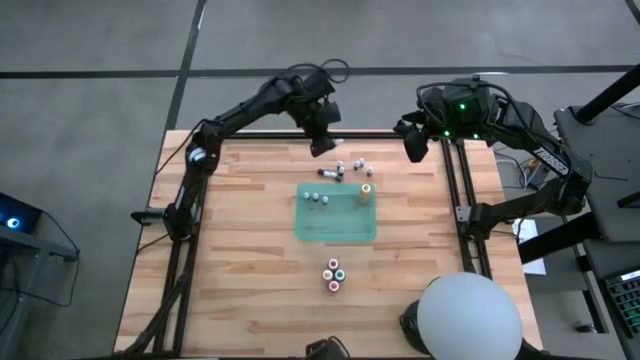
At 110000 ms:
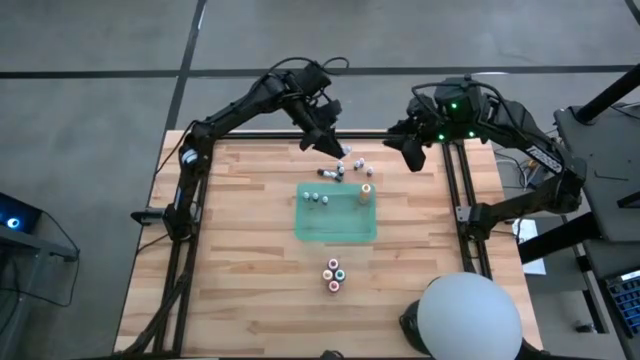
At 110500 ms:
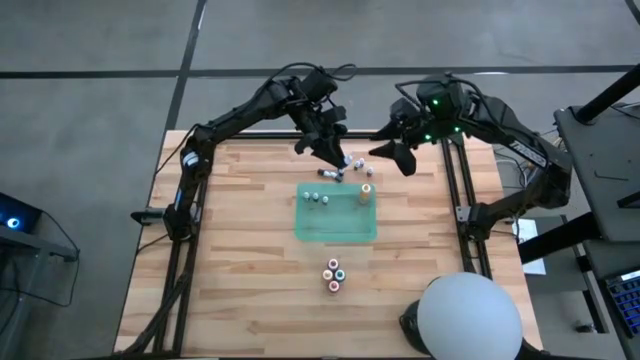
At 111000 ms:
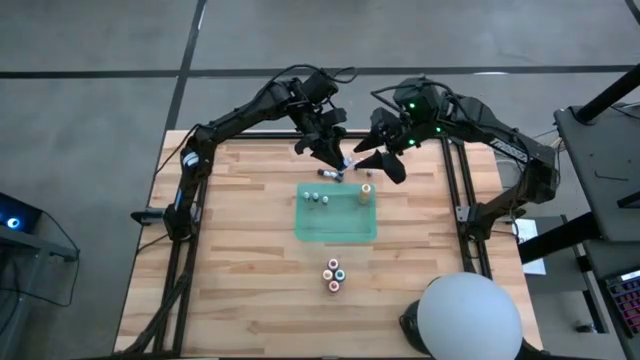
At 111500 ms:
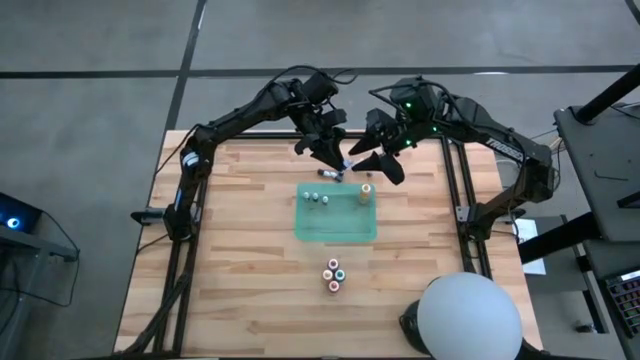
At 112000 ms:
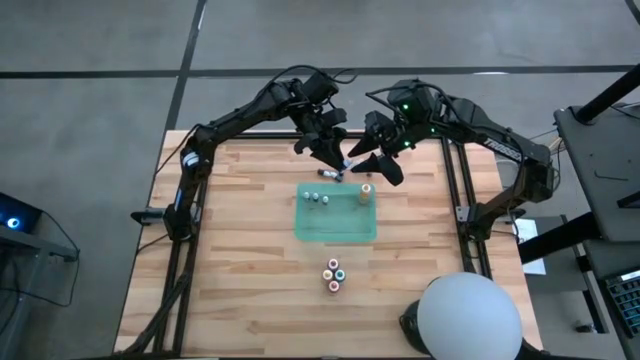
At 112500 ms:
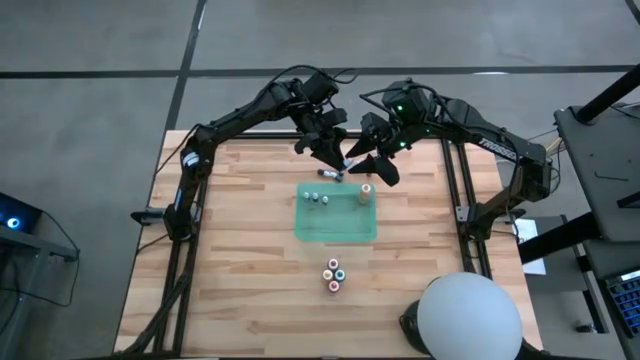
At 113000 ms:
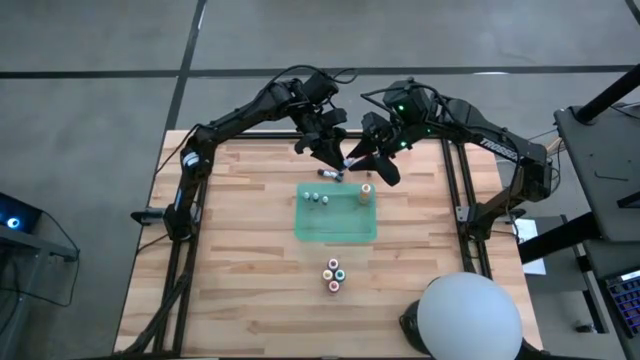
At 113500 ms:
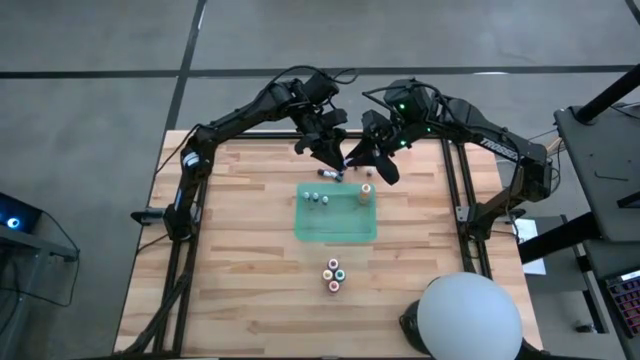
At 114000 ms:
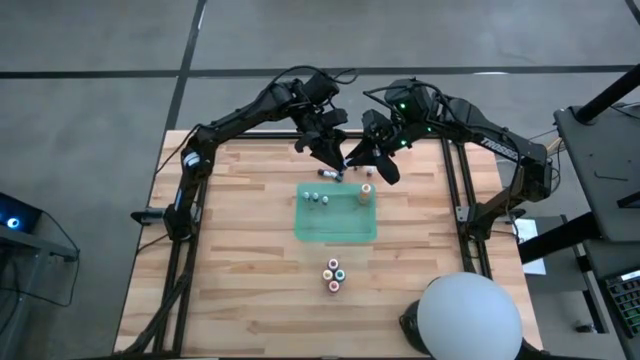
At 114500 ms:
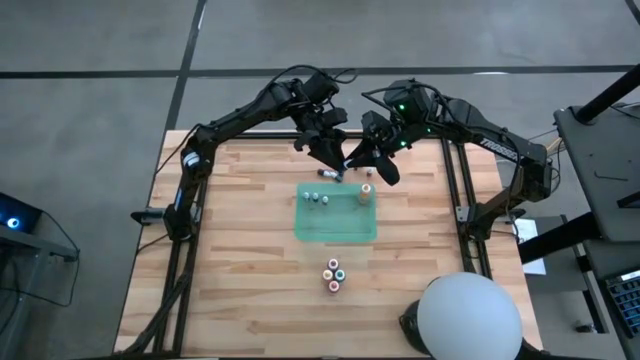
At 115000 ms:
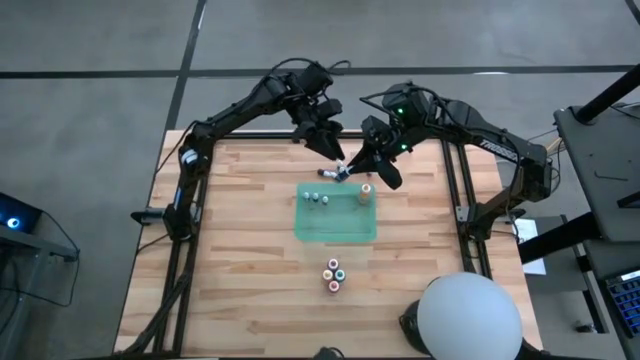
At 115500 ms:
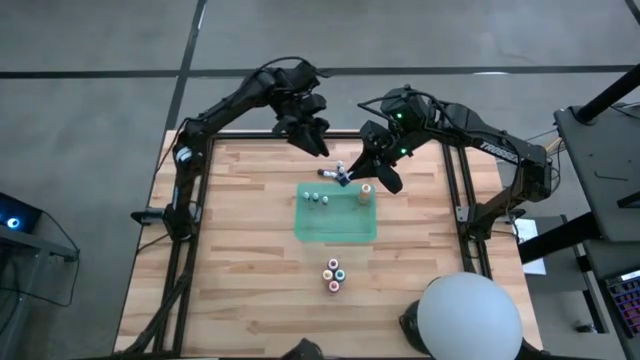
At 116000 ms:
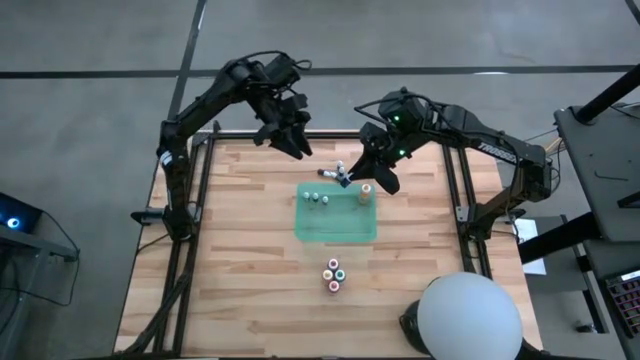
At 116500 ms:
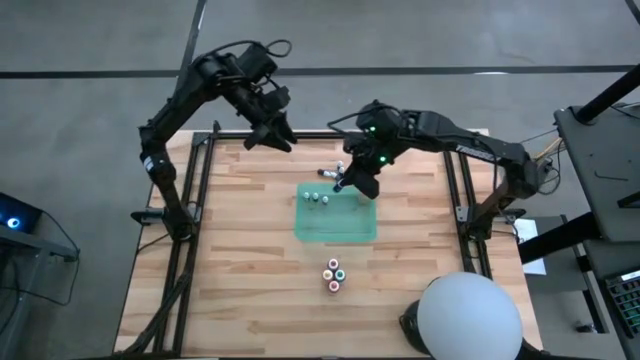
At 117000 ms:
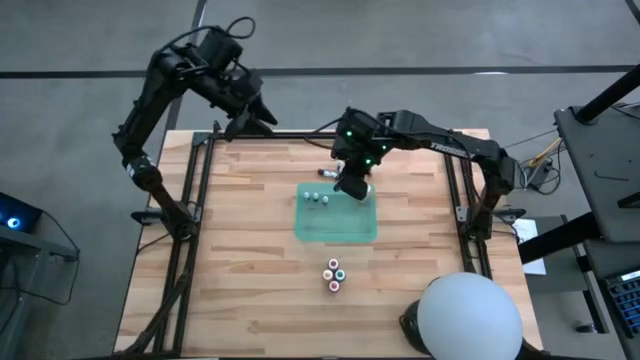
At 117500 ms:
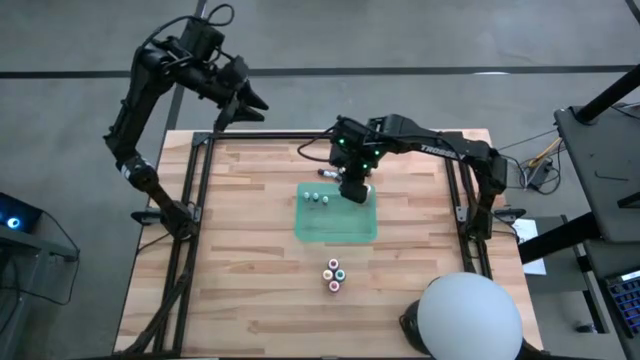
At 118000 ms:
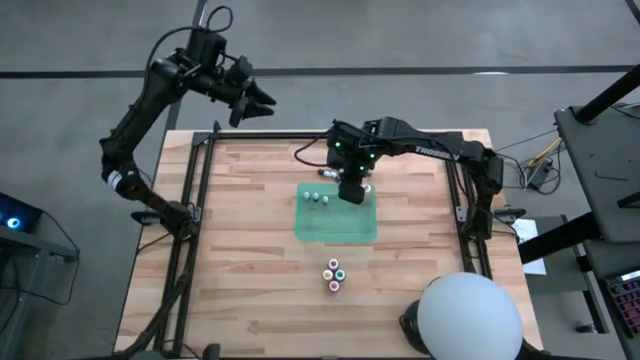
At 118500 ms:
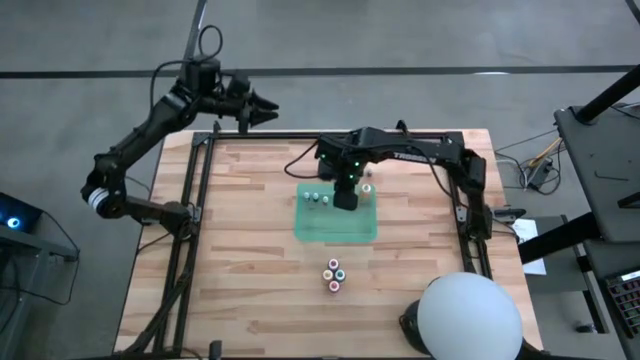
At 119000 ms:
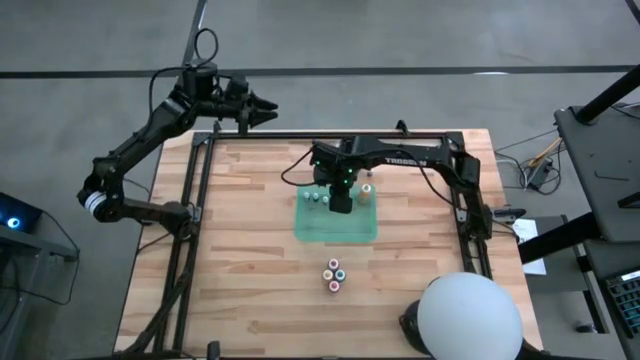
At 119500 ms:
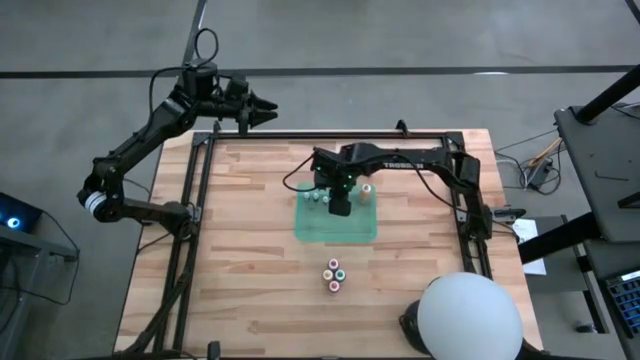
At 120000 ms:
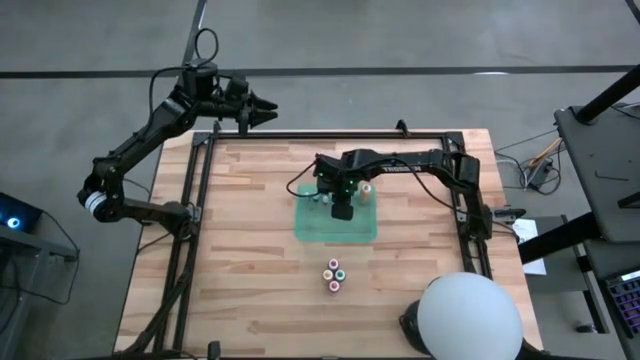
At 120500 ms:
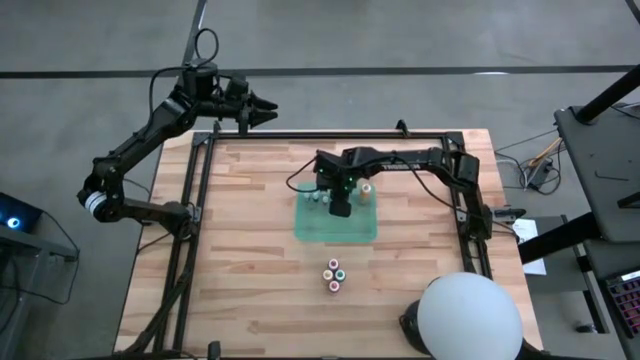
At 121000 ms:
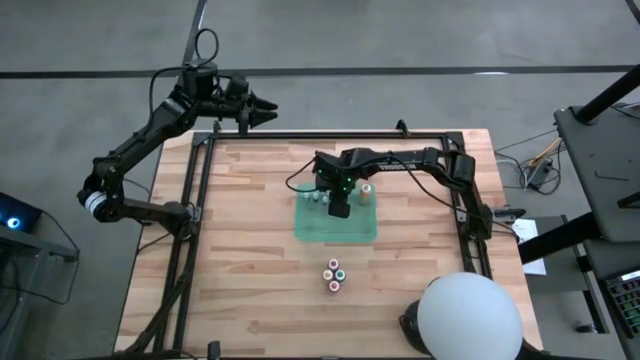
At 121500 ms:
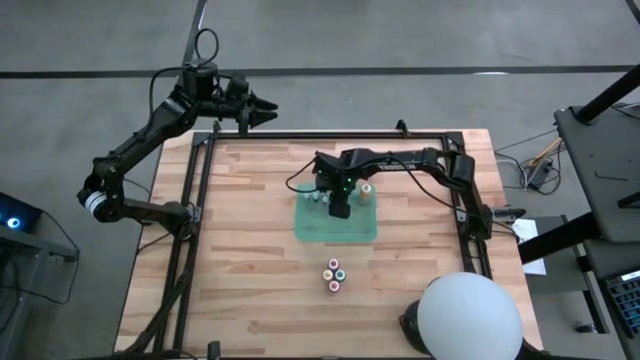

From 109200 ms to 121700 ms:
Task: Pick & Place food coloring
Put the black small food coloring bottle into the green container

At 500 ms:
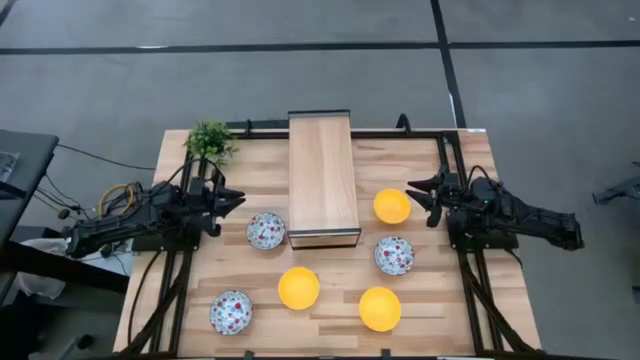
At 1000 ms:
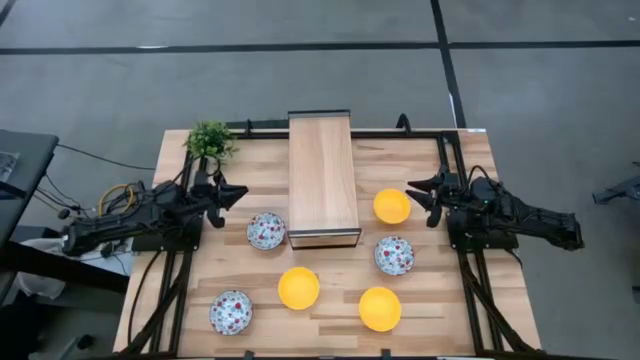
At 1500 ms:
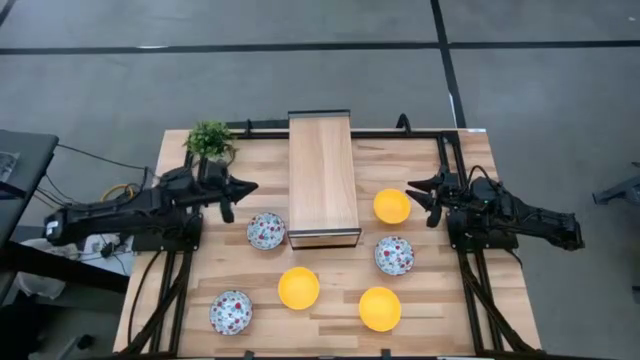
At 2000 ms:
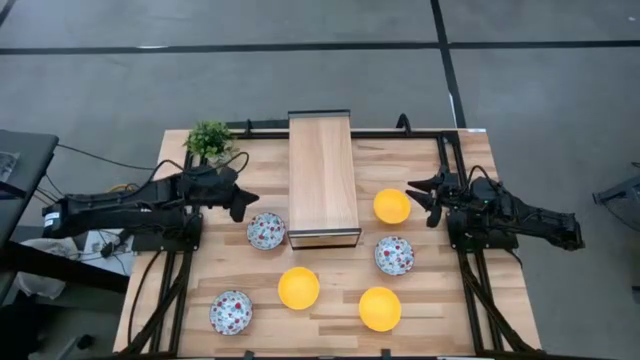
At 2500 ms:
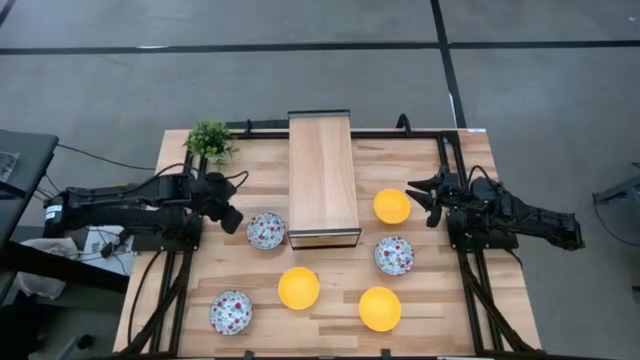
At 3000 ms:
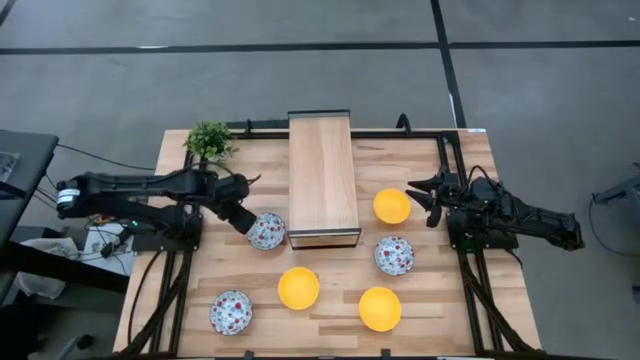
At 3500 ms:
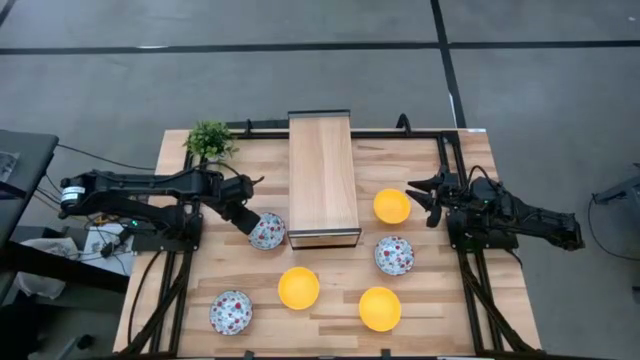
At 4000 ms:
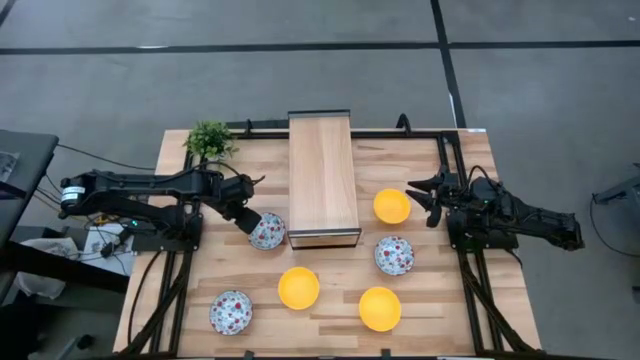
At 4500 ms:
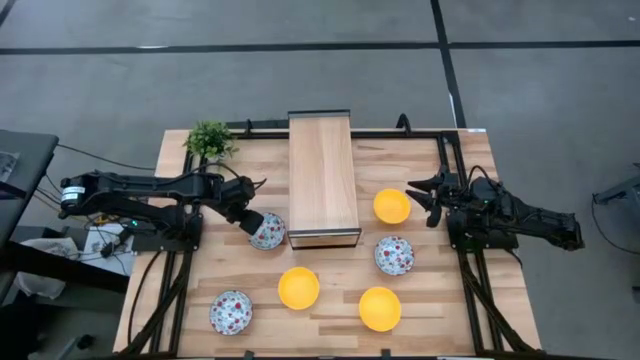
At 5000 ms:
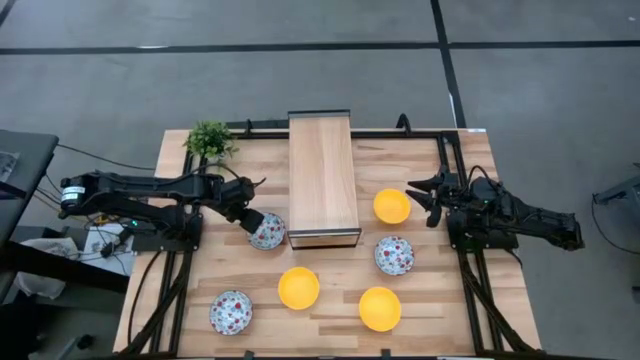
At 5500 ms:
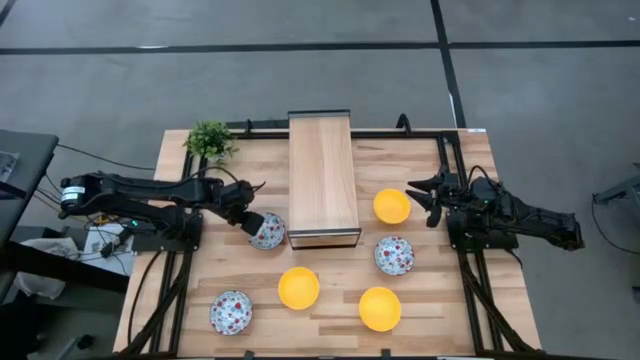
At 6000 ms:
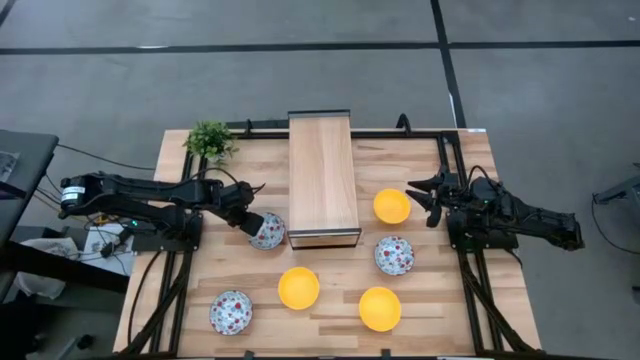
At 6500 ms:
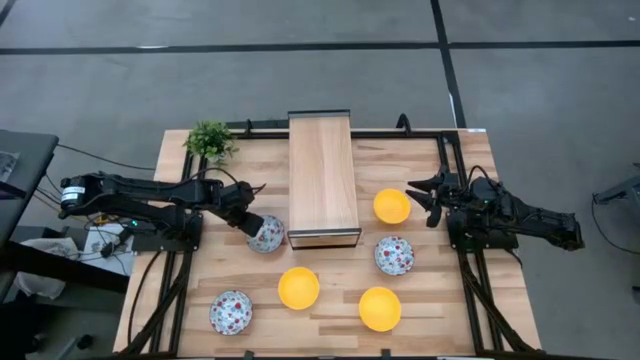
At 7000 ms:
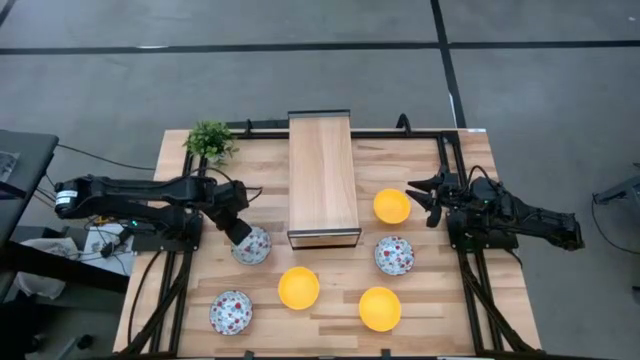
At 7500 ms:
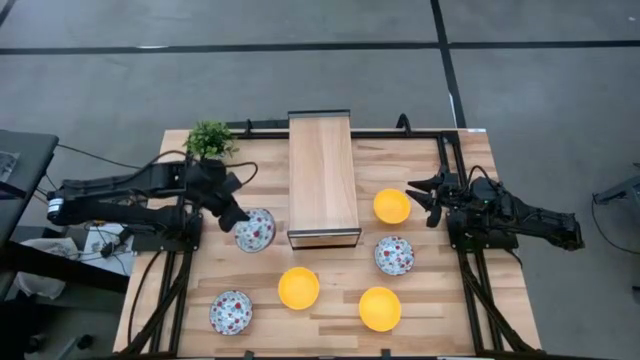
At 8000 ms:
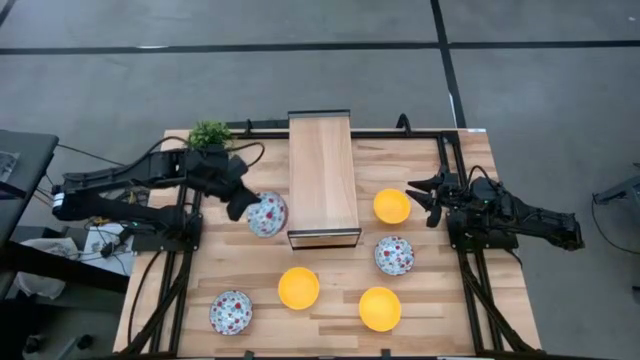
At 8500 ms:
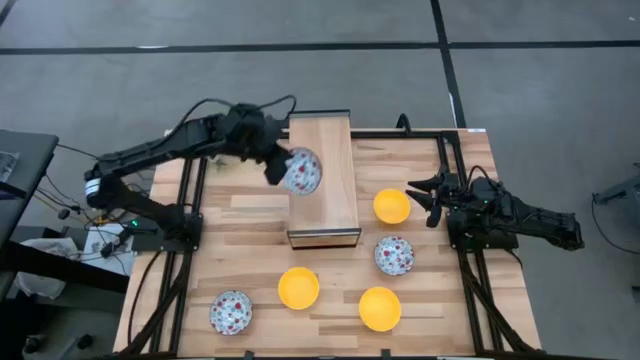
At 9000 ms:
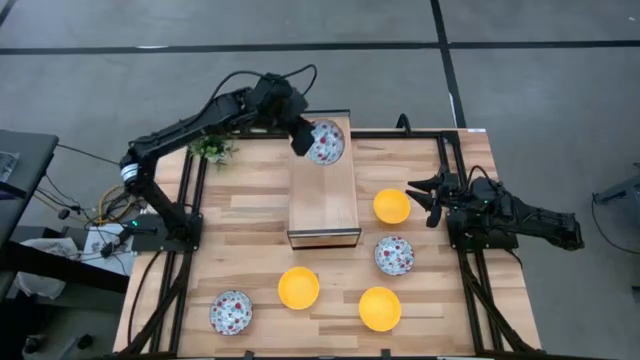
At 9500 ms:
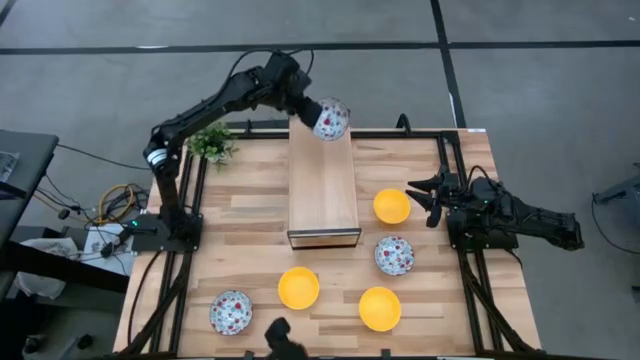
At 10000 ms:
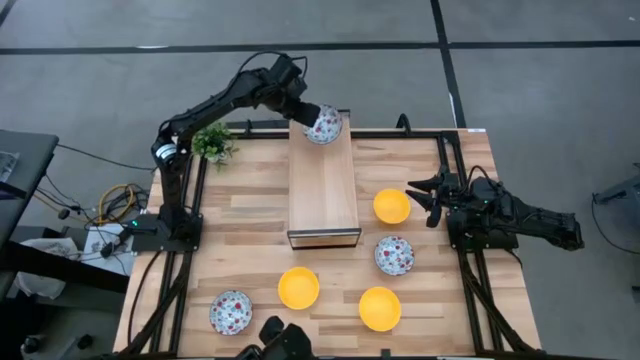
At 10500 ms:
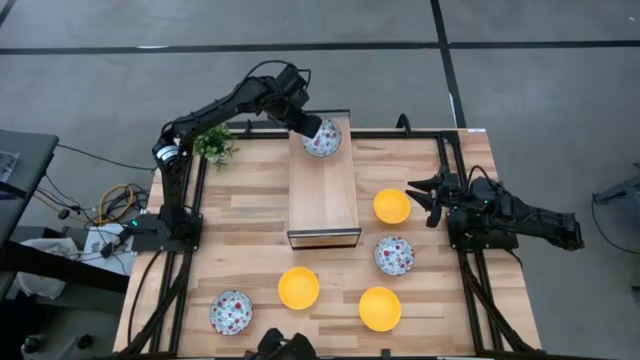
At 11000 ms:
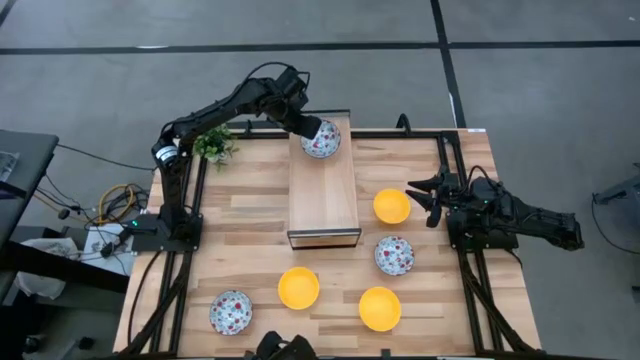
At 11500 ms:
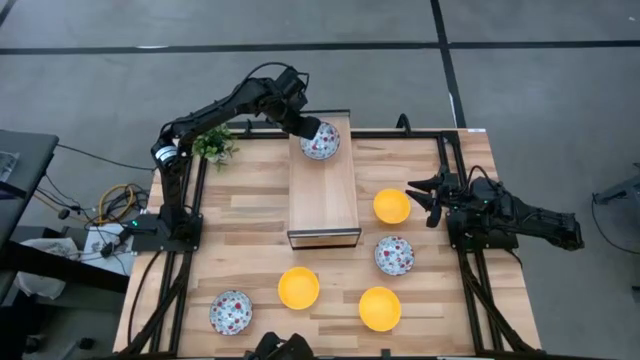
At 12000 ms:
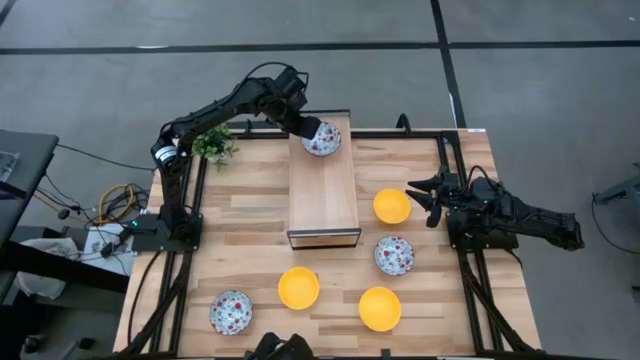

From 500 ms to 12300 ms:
Task: Pick & Place Mini bowls
Put the top left white patterned bowl on the shelf
